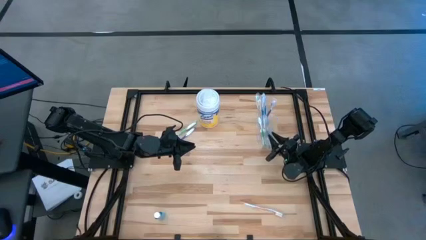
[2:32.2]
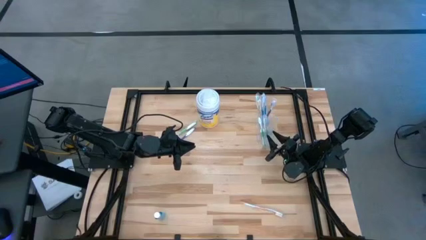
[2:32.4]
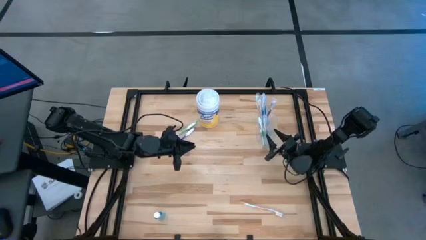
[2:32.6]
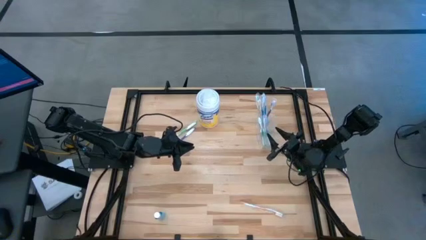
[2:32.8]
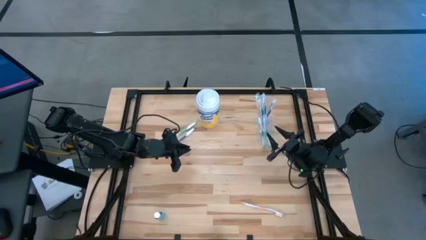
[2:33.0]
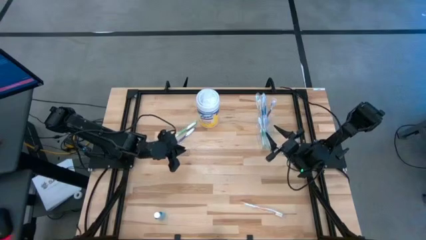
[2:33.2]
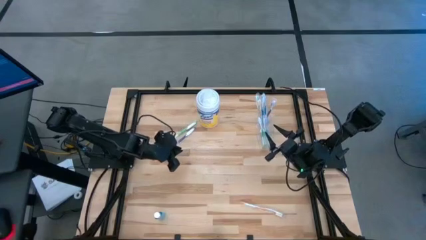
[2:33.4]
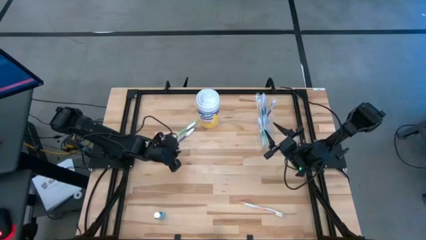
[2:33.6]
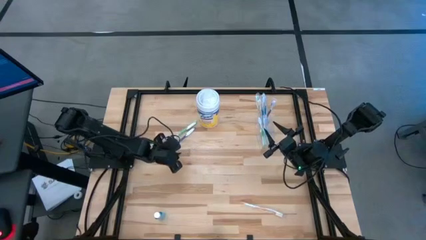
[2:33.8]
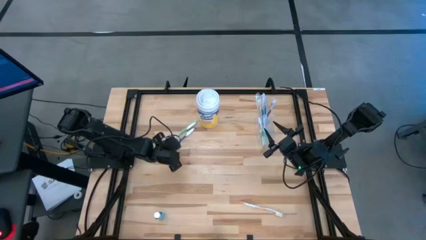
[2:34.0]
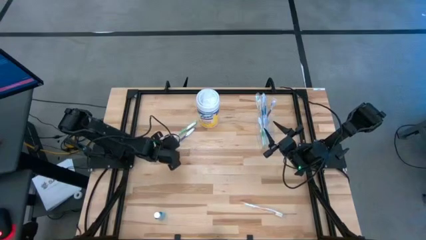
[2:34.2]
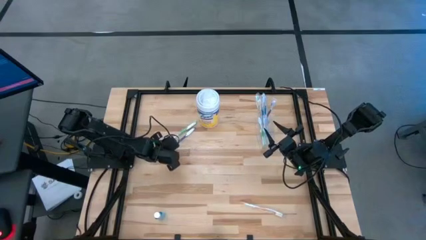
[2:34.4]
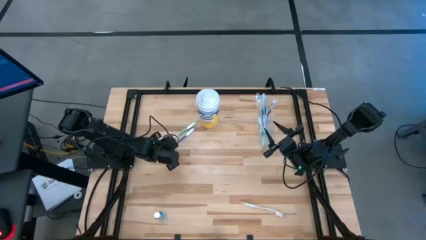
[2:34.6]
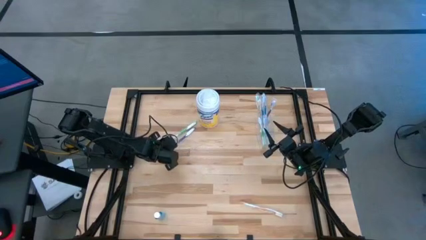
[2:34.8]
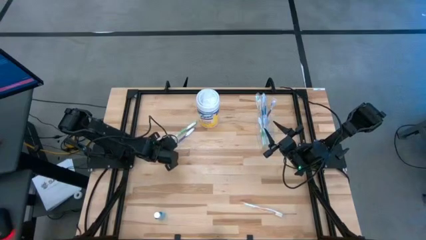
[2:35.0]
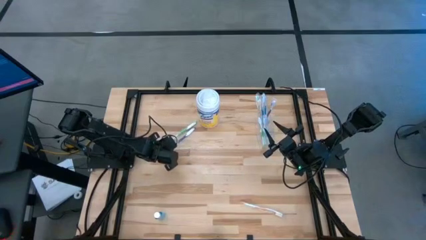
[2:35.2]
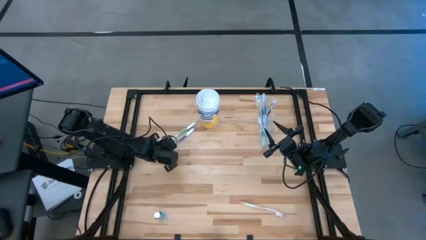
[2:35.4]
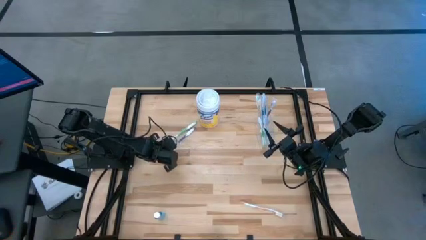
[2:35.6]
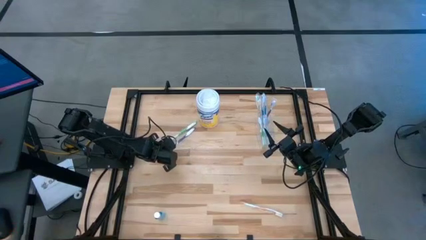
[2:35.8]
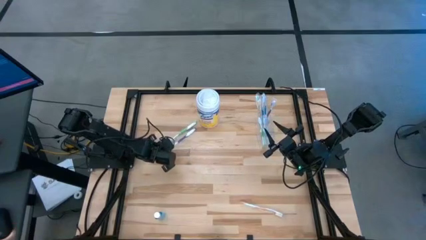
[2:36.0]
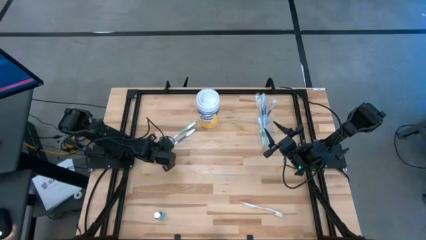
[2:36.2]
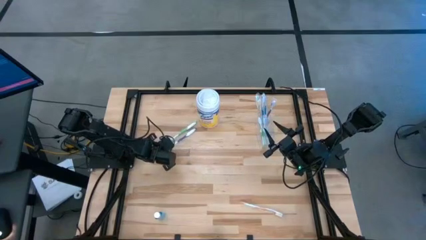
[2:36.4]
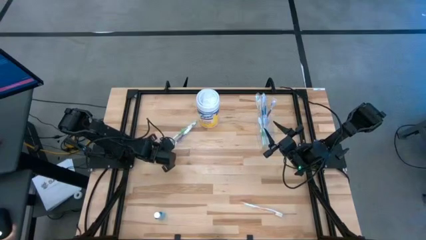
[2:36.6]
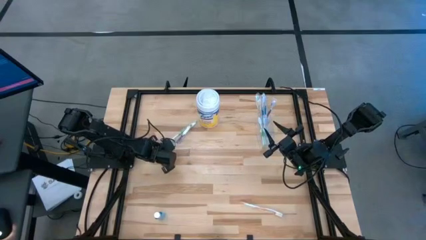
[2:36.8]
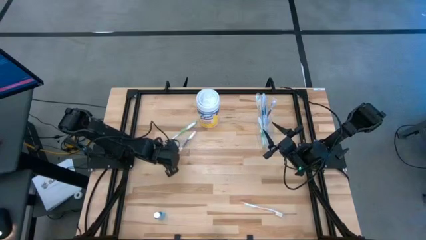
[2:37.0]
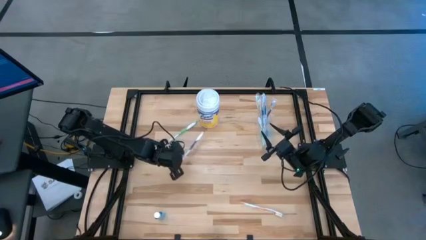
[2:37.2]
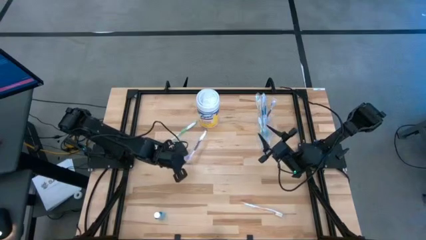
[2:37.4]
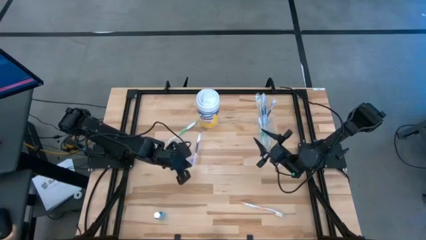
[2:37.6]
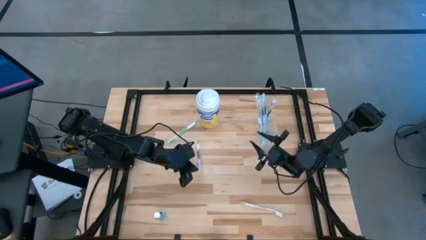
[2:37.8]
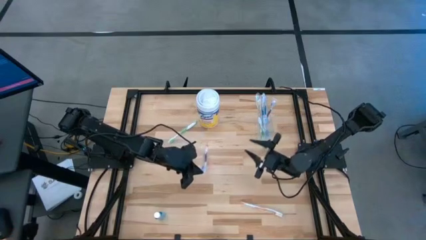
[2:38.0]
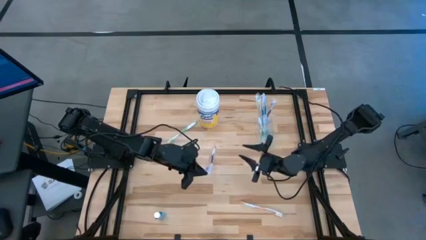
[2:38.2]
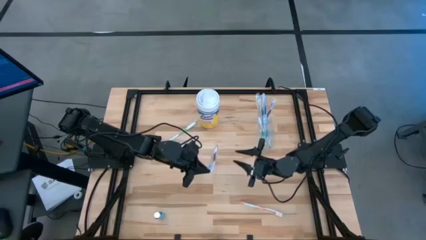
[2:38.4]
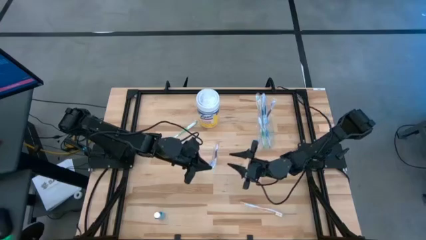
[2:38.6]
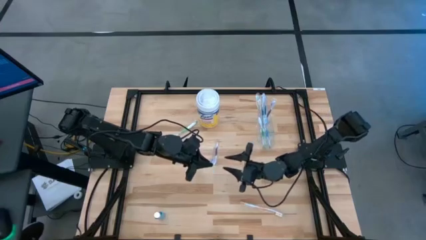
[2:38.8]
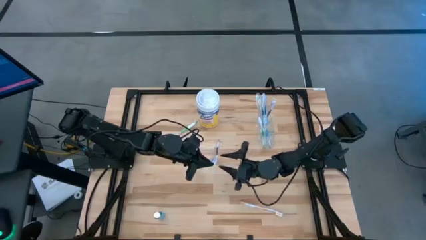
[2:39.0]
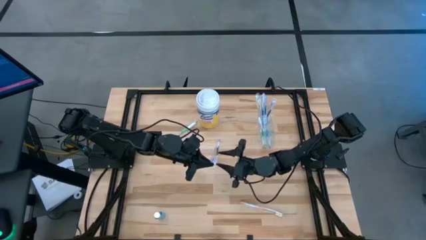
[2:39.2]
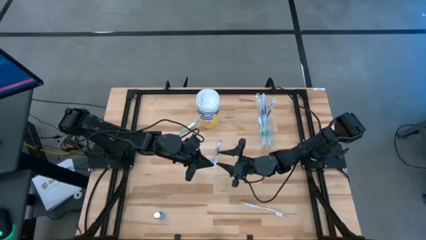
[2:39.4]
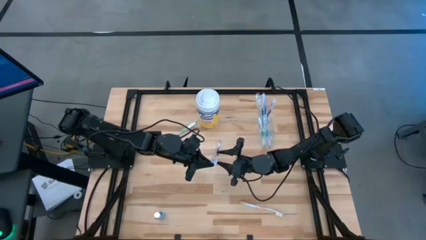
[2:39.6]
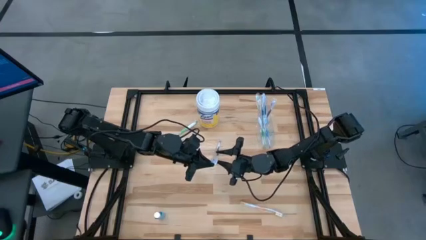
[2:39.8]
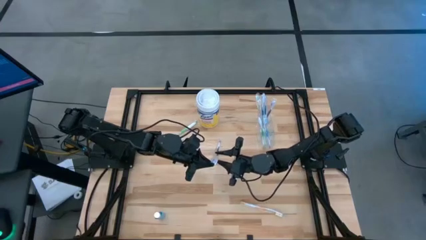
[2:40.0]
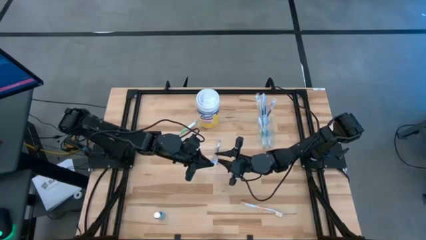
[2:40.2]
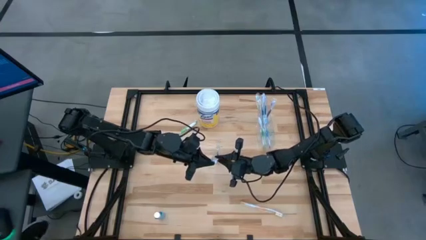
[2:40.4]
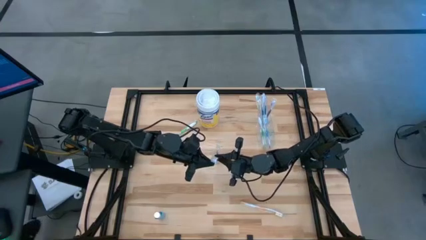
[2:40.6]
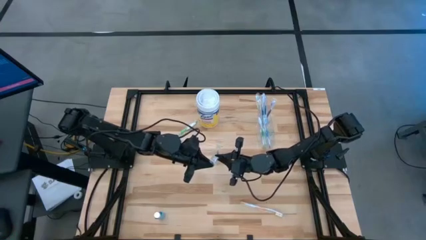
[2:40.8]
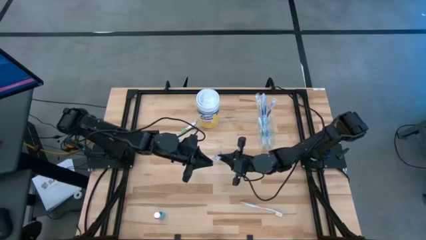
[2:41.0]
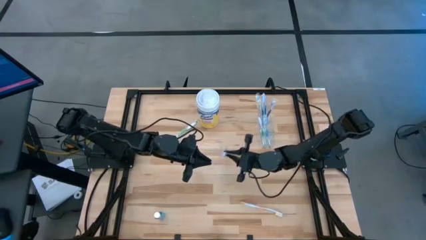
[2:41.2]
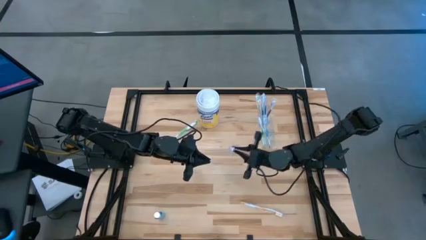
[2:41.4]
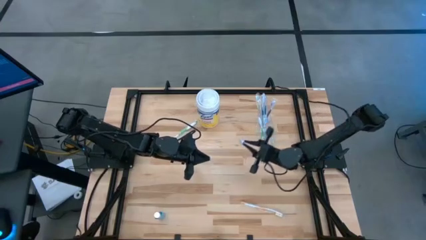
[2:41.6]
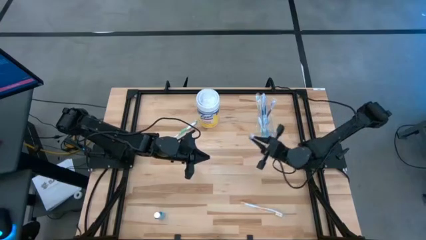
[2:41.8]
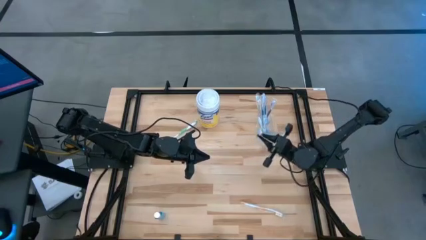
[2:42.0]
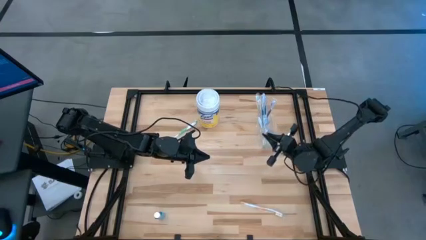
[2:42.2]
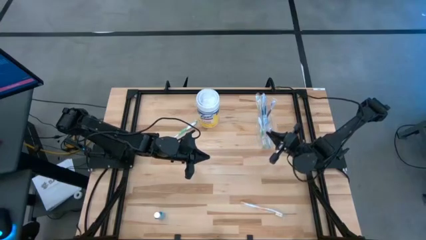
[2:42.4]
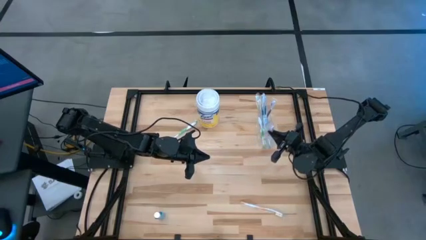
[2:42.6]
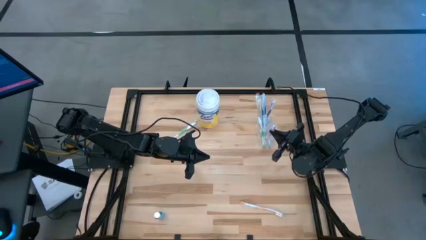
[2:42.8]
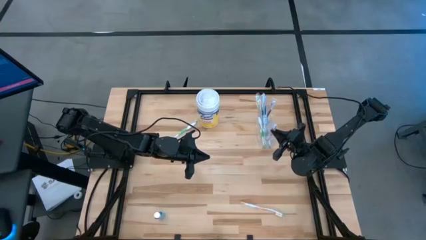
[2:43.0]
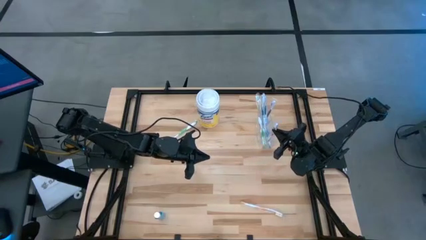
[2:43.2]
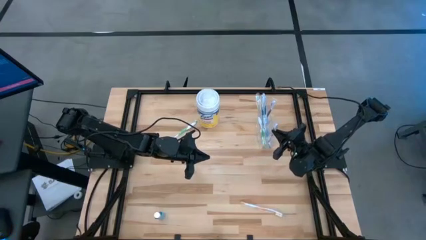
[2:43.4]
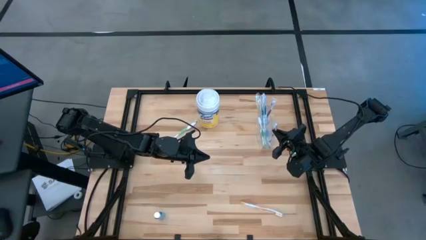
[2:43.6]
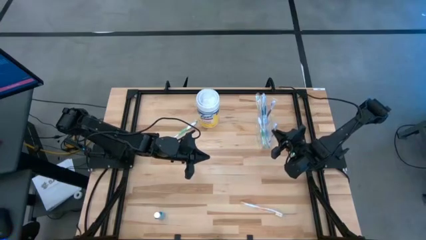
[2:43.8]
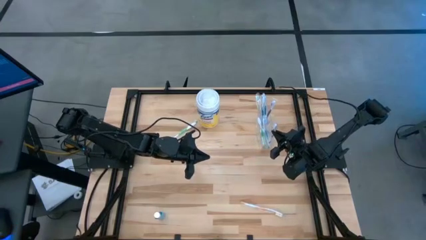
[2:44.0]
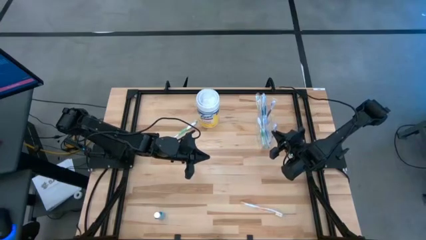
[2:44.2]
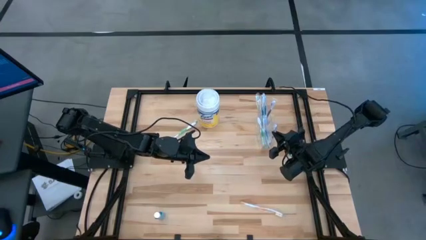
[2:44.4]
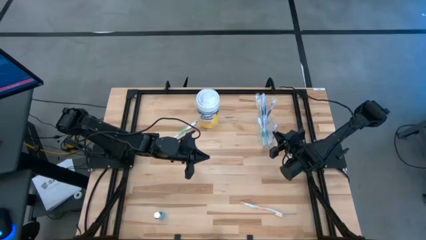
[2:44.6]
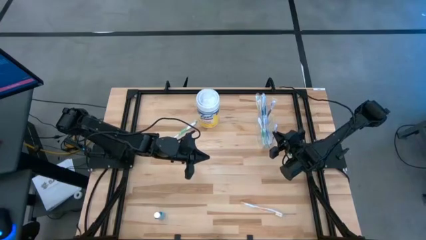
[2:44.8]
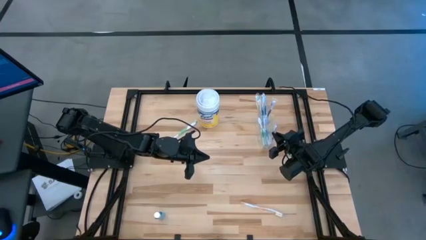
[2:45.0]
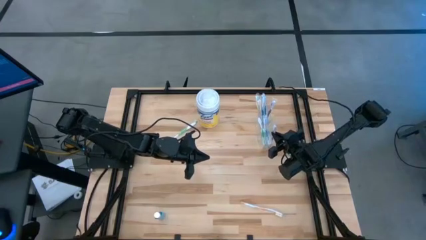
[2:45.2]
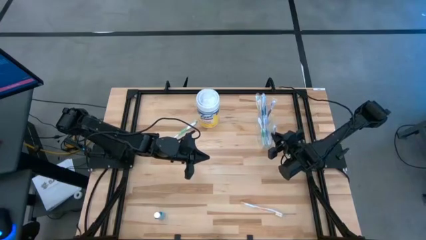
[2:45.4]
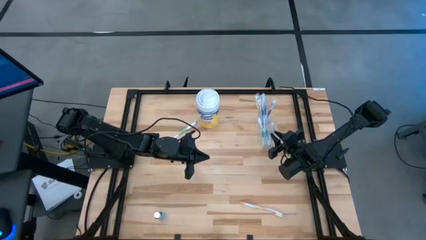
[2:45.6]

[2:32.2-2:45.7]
Task: Pick & Place toothbrushing station
Put the purple toothbrush into the transparent organizer

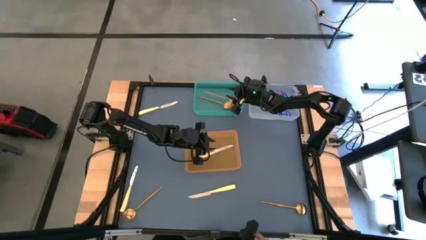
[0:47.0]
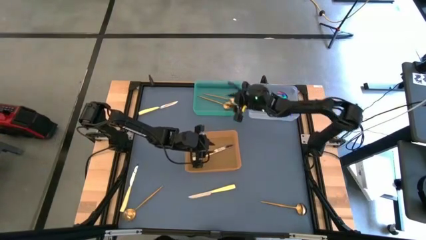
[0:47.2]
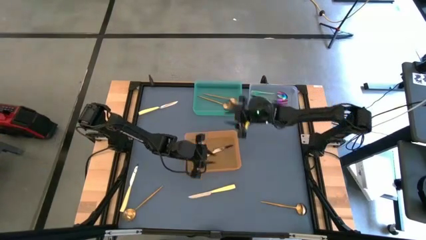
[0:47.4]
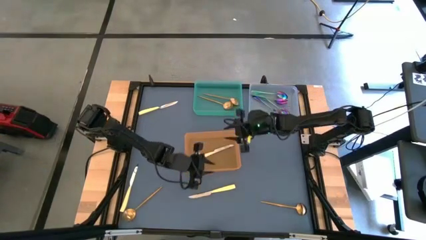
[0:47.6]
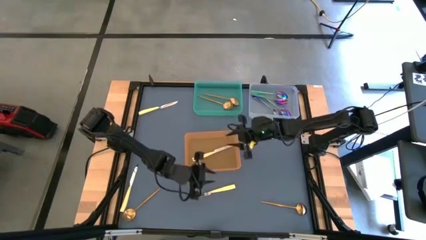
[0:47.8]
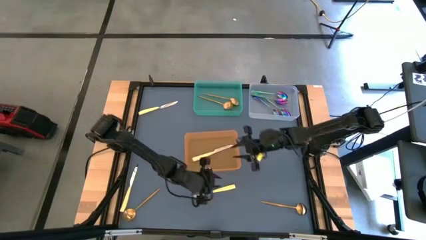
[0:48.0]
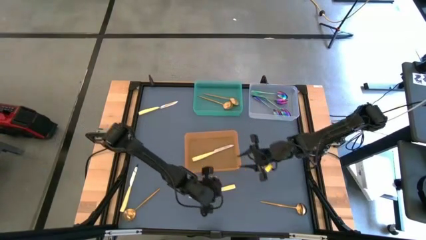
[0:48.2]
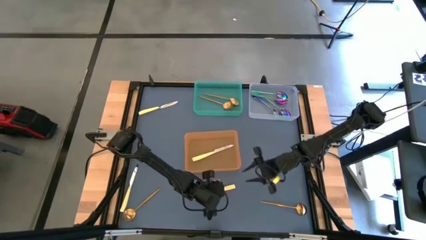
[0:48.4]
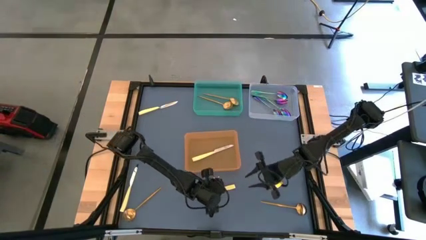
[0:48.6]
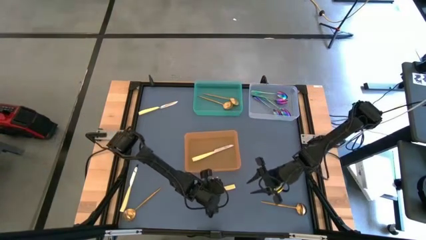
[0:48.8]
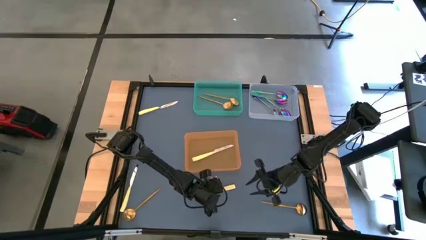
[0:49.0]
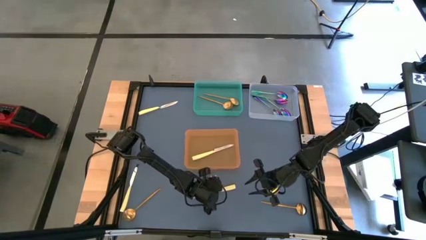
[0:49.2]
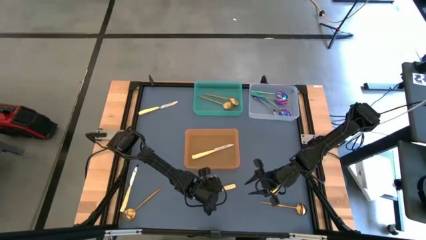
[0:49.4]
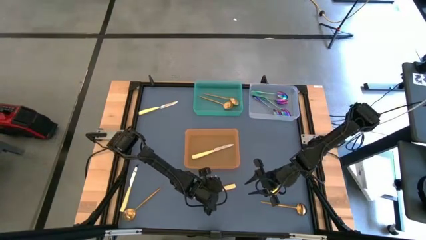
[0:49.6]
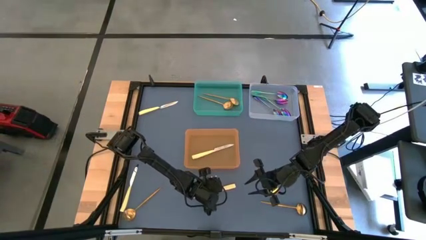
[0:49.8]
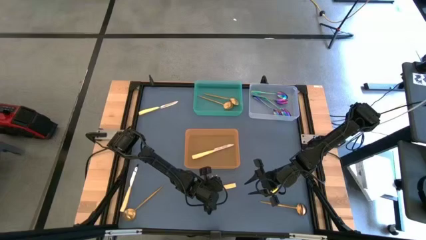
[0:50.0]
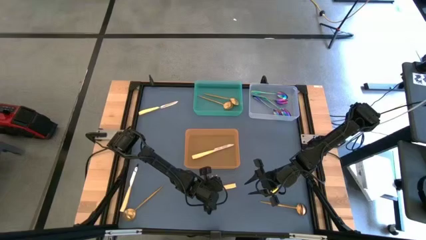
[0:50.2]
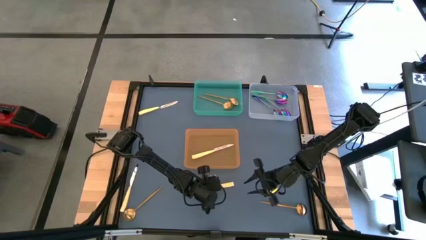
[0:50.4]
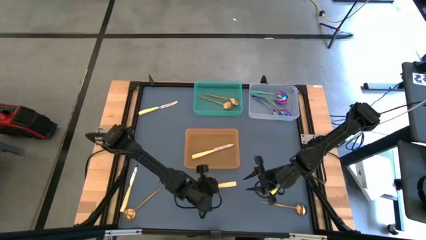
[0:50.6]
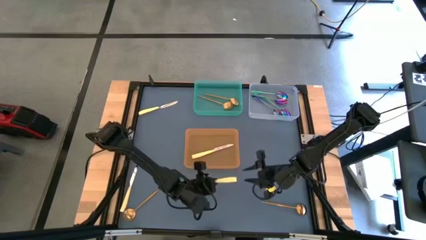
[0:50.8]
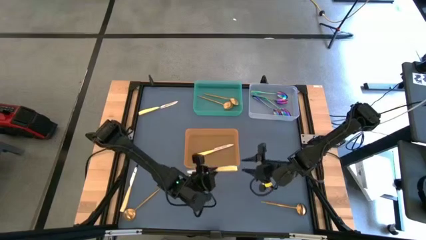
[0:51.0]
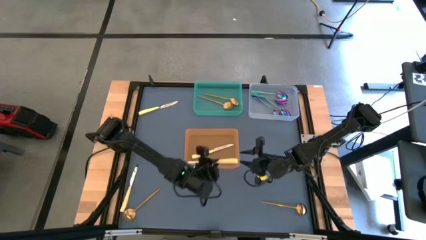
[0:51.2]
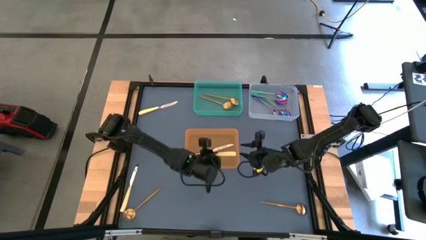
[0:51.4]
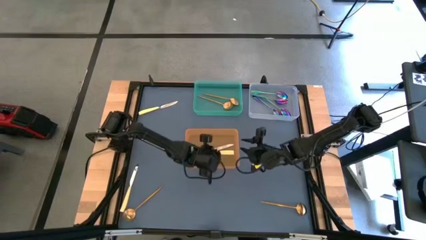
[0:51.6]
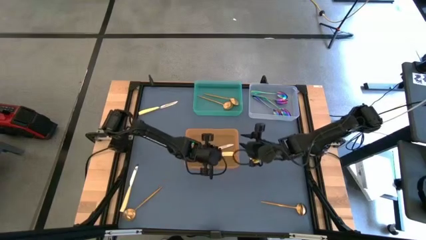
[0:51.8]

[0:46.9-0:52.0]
Task: Sort silverware by color (type)
Put the yellow knife into the orange bin
